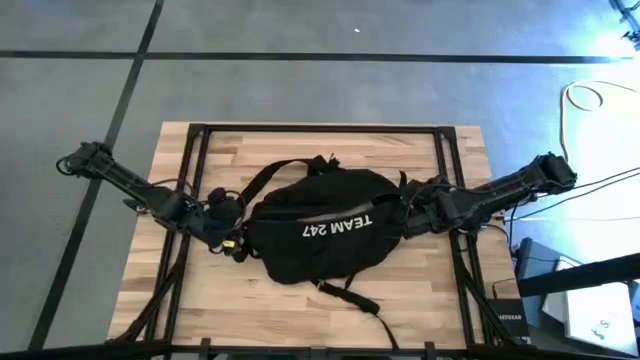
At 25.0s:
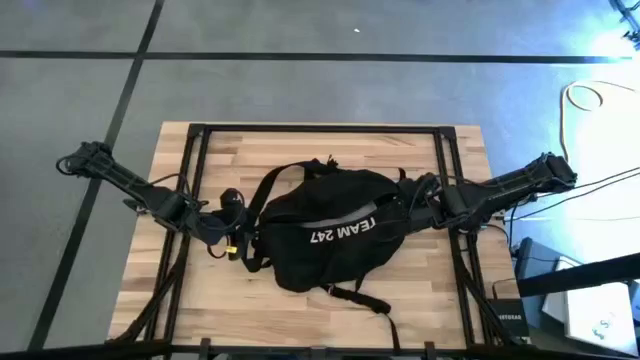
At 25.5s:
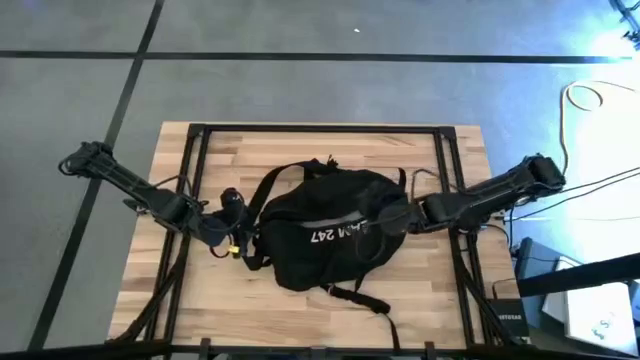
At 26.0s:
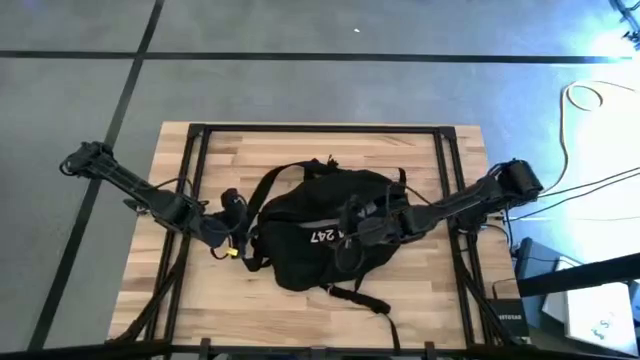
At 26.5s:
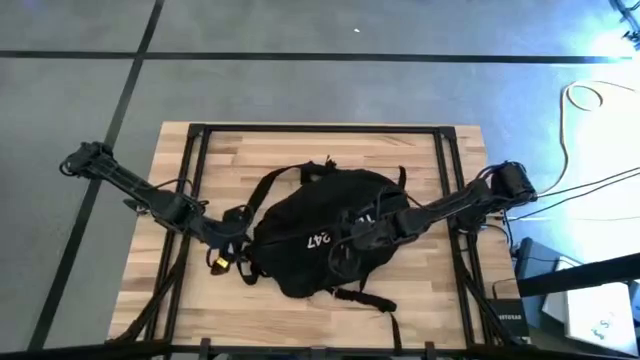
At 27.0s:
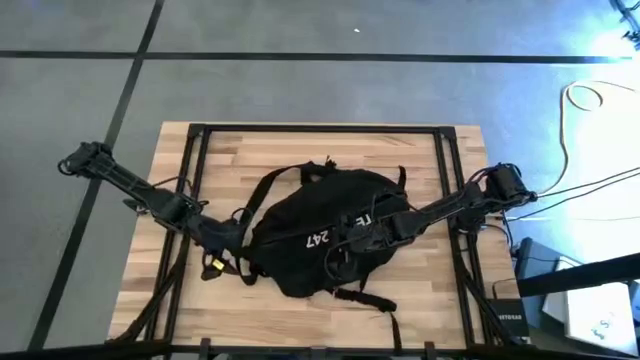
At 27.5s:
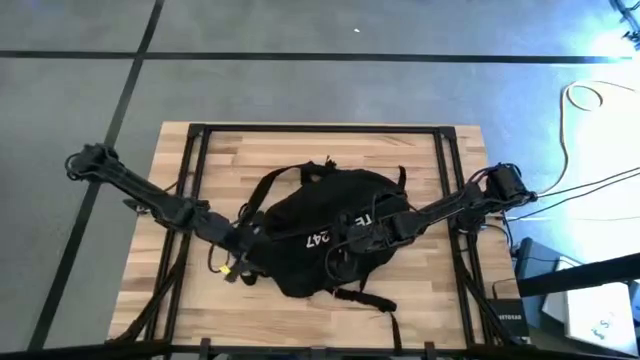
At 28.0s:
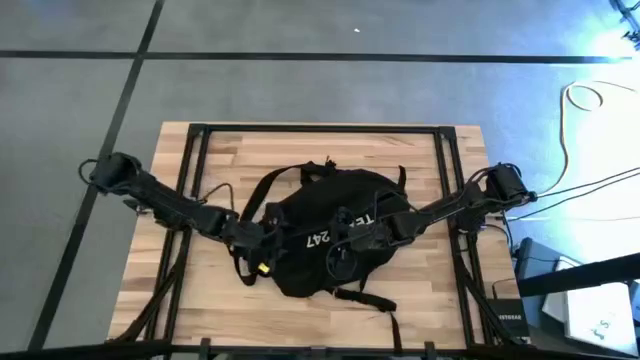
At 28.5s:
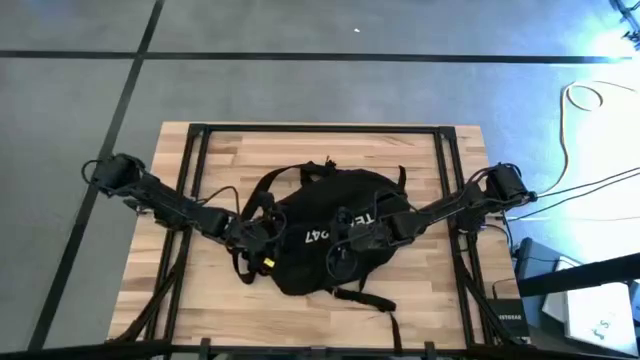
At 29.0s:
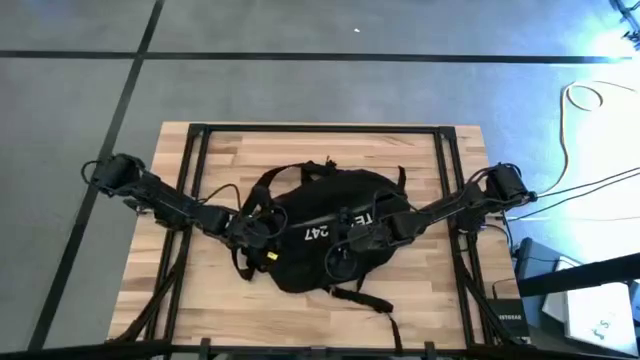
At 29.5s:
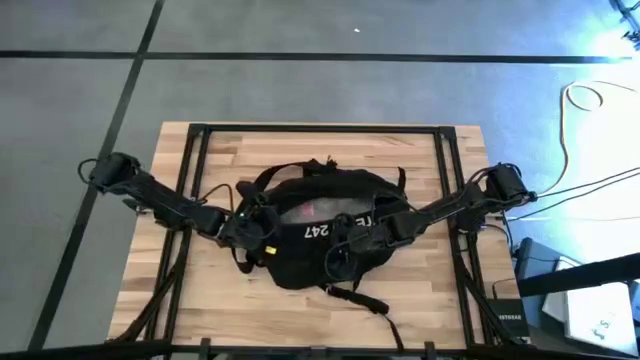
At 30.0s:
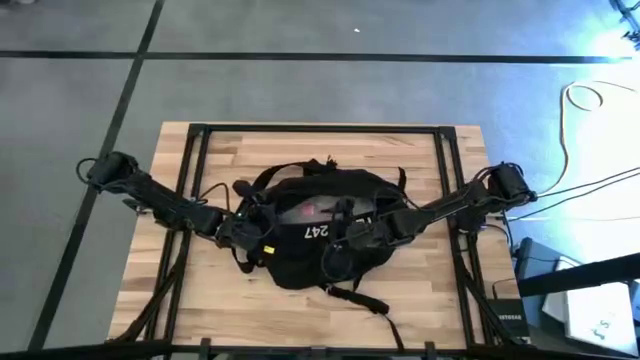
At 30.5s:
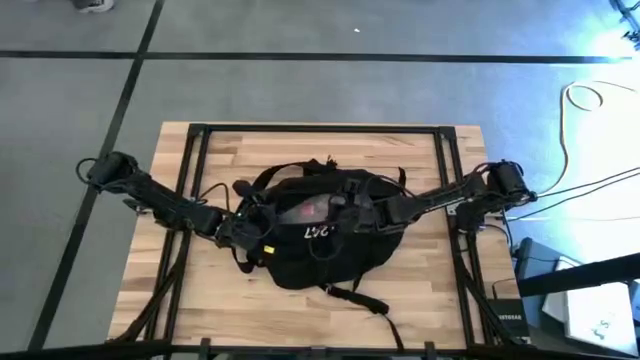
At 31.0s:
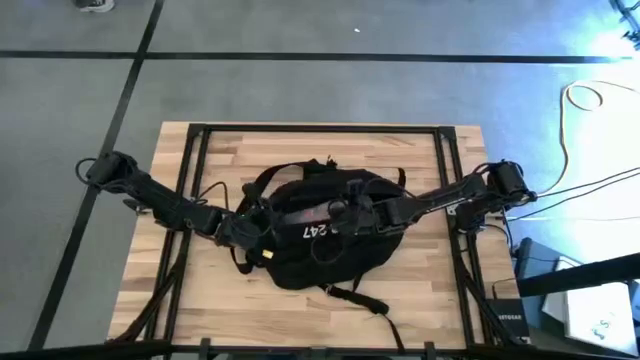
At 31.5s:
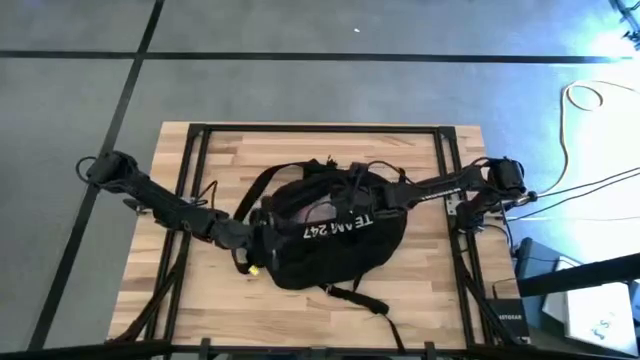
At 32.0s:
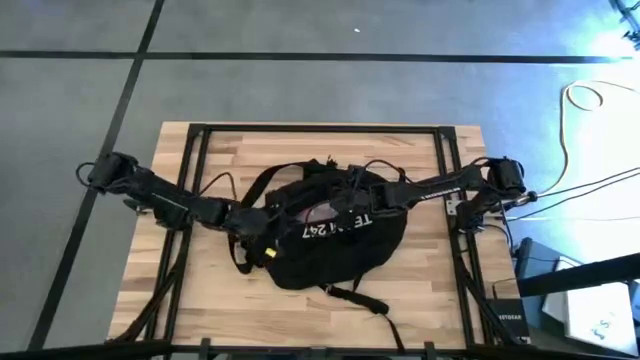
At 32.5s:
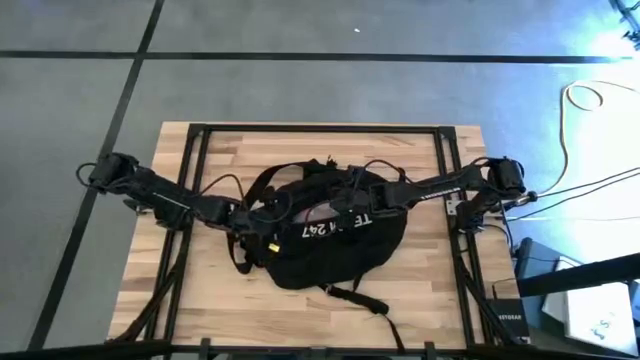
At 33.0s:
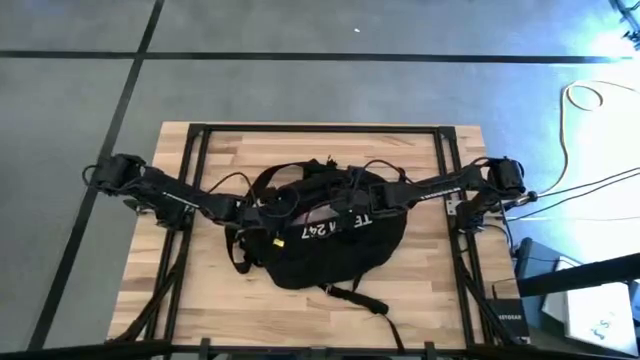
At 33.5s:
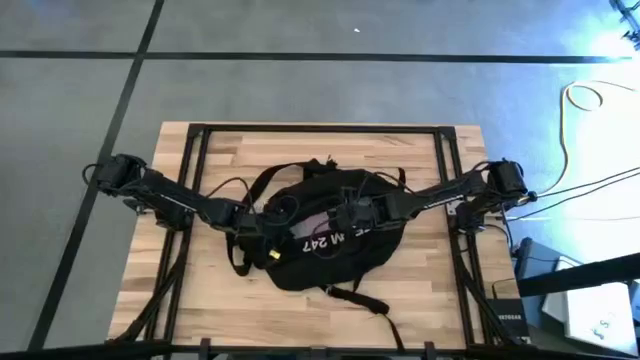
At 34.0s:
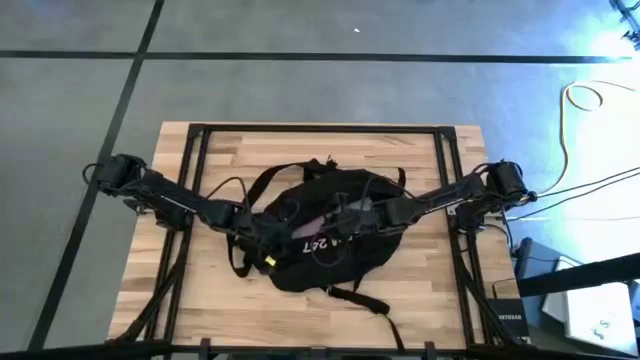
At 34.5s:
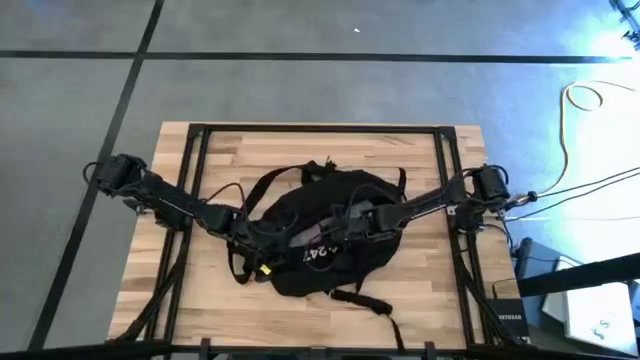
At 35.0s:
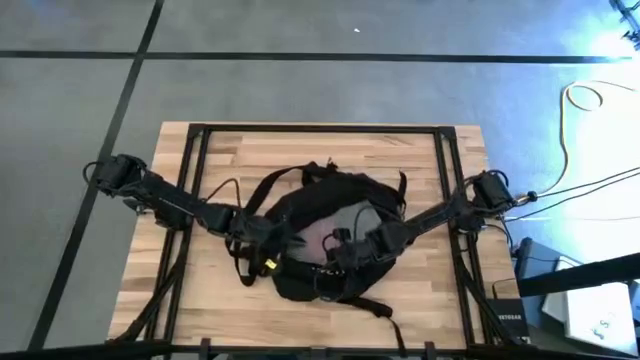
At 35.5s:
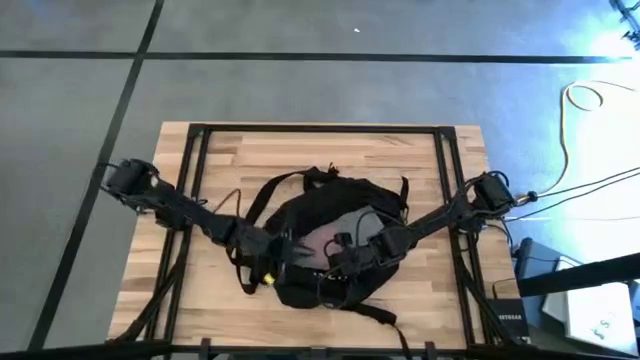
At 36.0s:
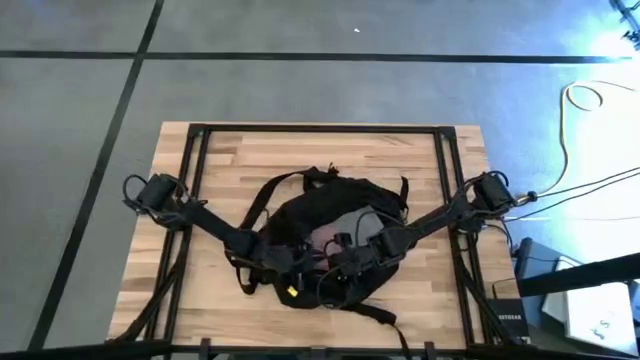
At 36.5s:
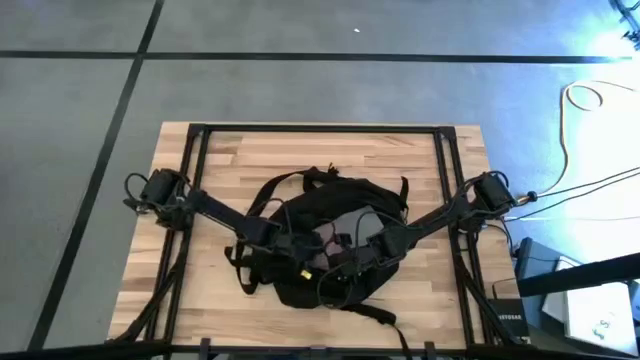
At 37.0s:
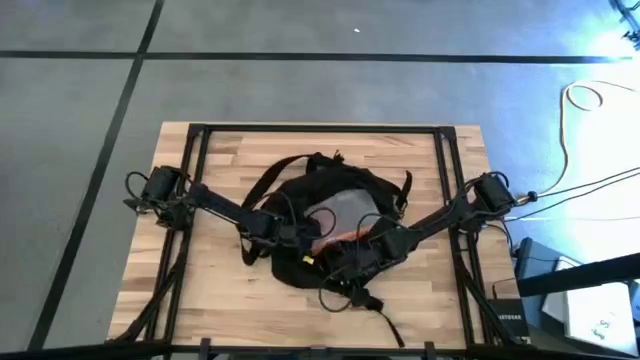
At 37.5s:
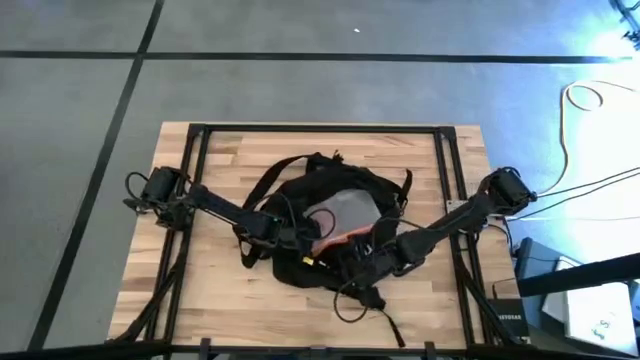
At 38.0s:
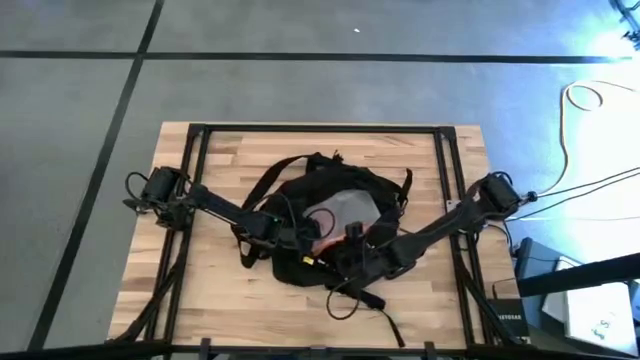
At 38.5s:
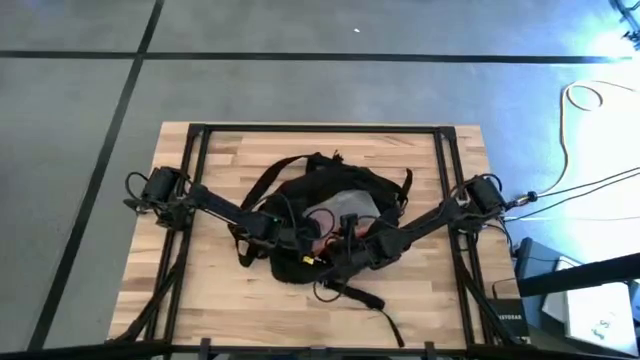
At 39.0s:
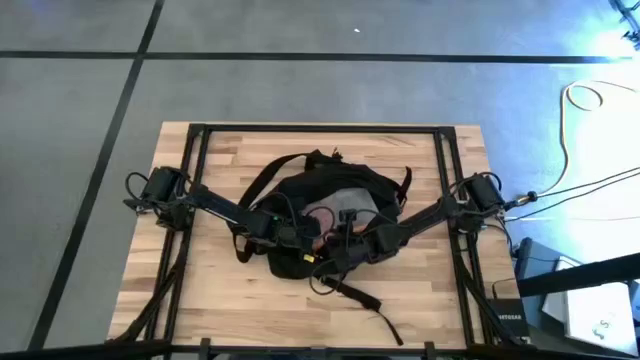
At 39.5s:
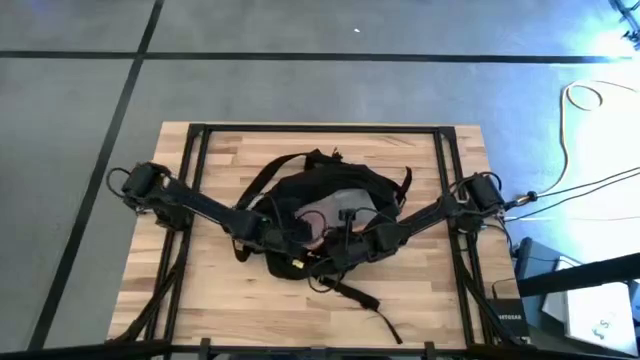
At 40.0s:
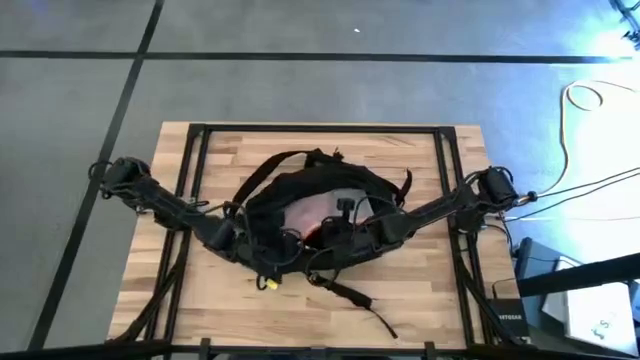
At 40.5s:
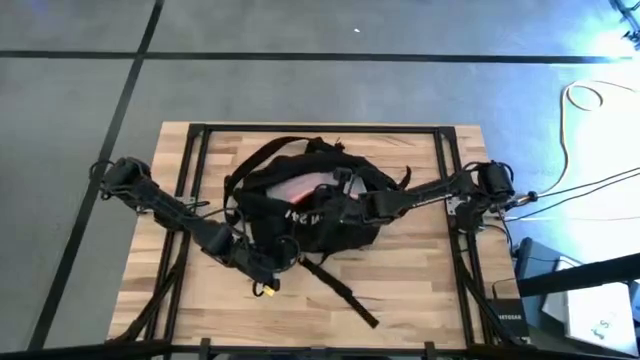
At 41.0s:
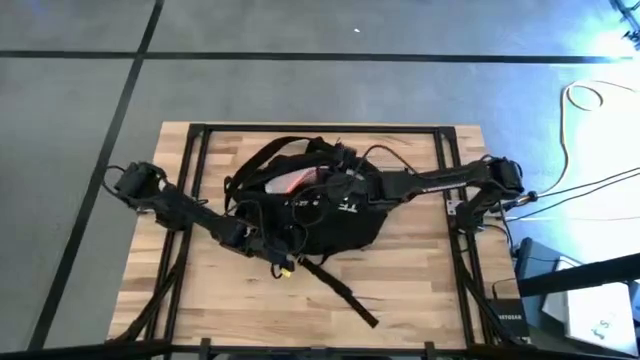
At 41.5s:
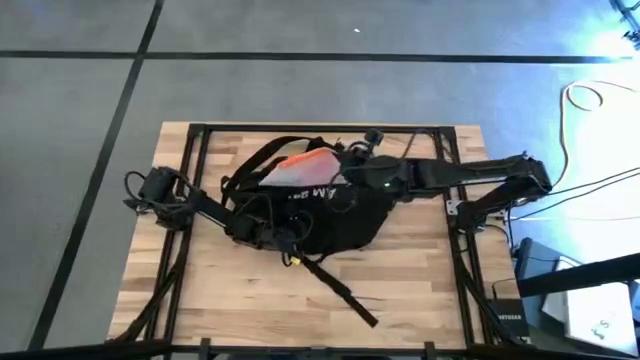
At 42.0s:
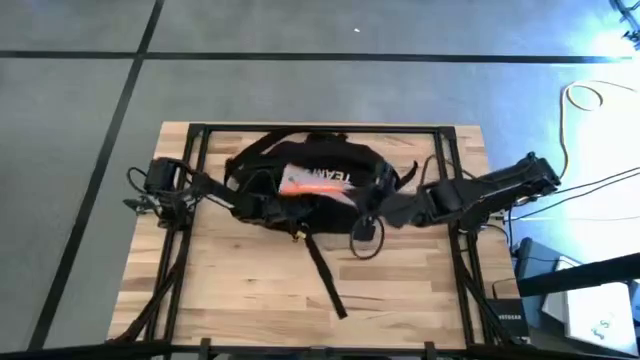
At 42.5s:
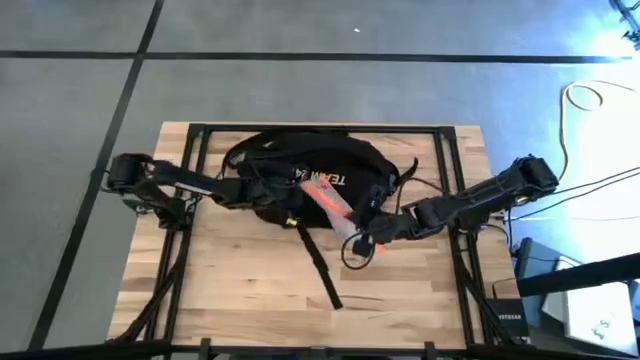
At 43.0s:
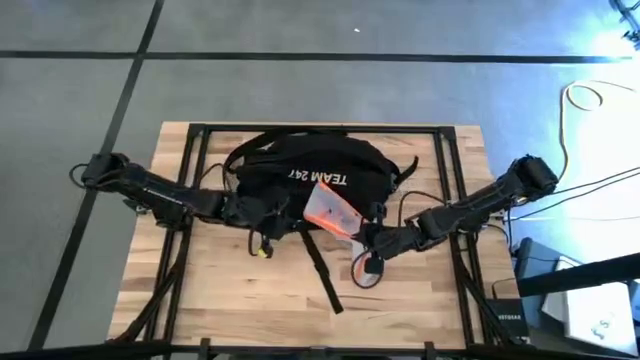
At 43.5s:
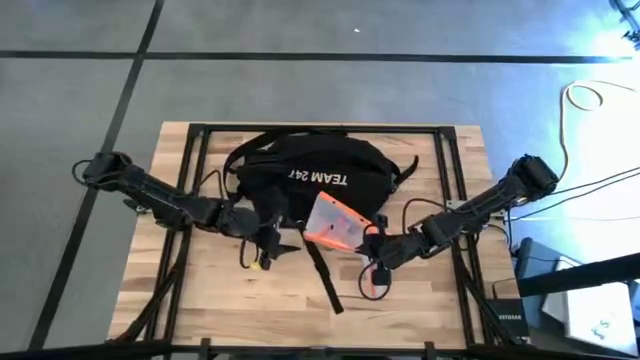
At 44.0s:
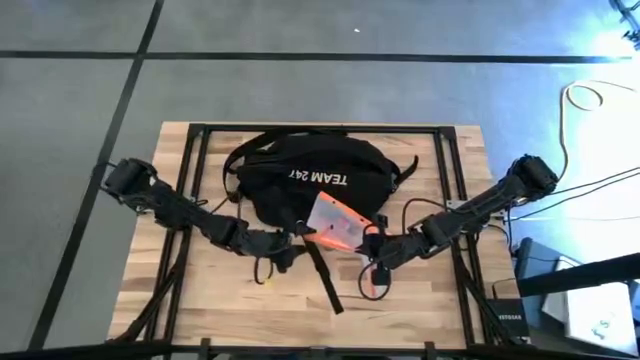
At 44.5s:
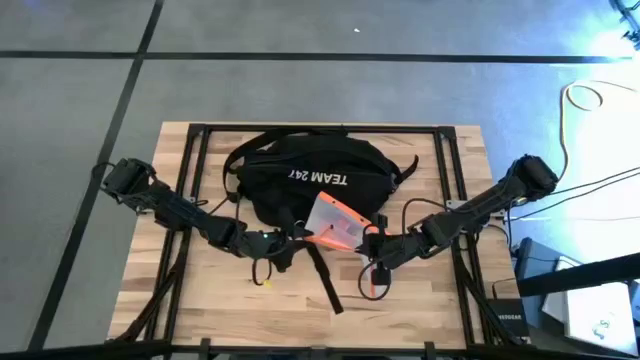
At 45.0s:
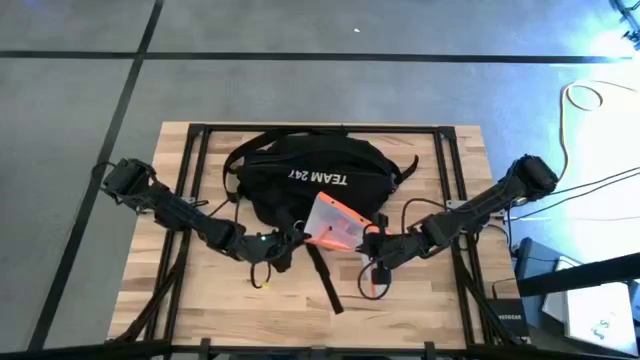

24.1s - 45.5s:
Task: Unpack backpack
Remove the white zip bag from the black bag
